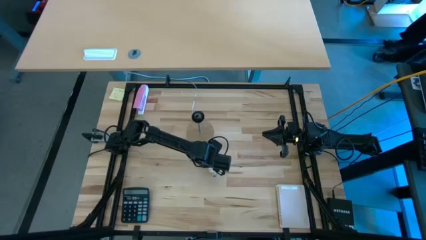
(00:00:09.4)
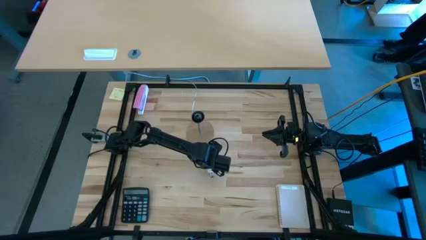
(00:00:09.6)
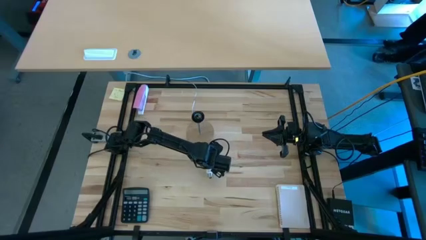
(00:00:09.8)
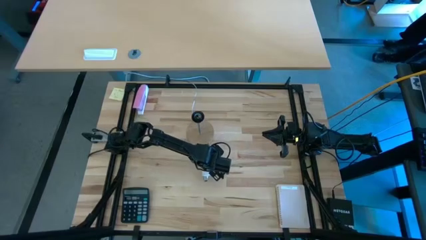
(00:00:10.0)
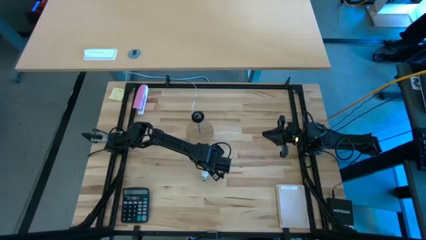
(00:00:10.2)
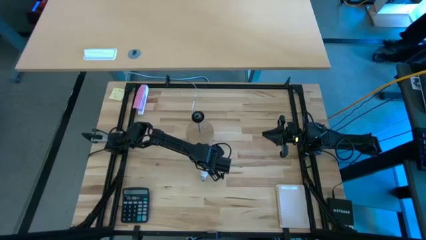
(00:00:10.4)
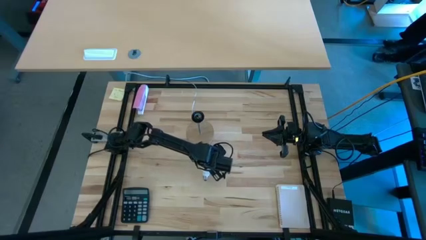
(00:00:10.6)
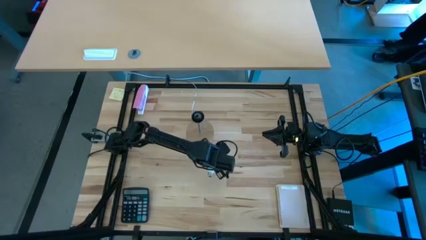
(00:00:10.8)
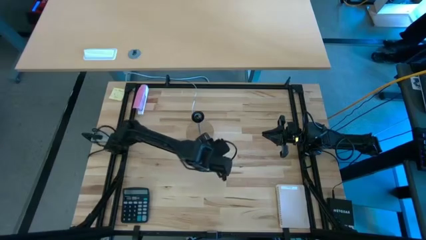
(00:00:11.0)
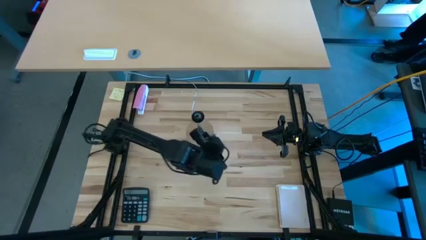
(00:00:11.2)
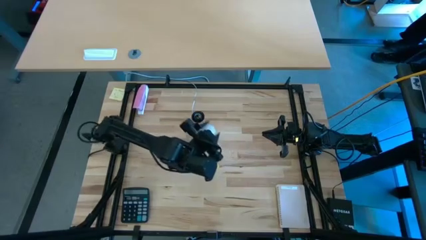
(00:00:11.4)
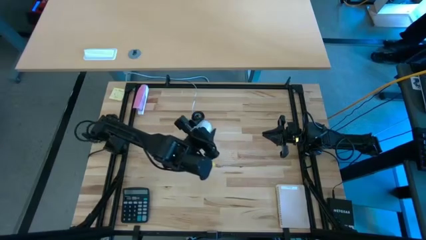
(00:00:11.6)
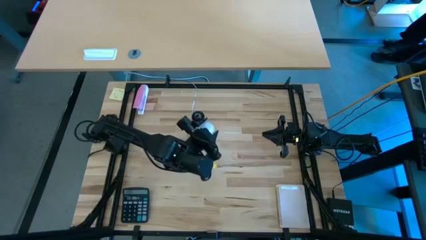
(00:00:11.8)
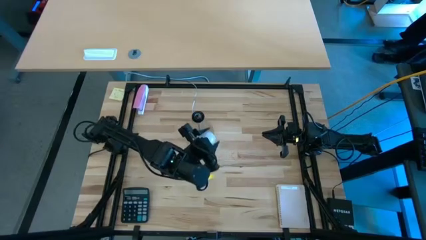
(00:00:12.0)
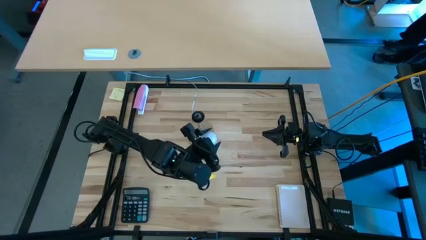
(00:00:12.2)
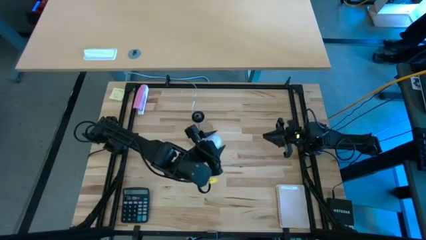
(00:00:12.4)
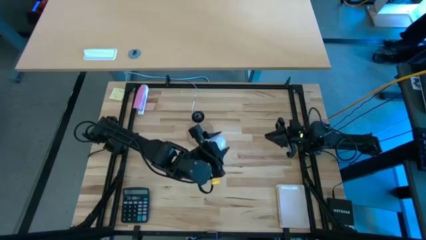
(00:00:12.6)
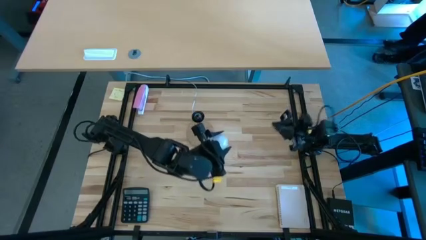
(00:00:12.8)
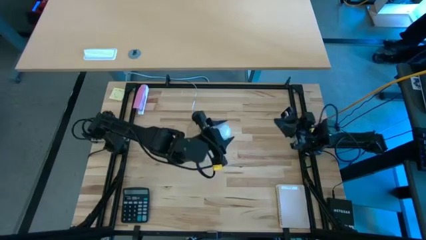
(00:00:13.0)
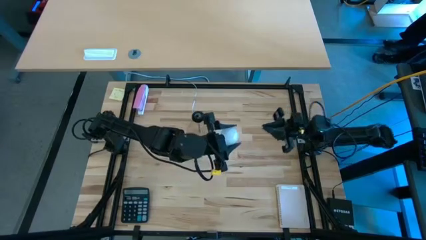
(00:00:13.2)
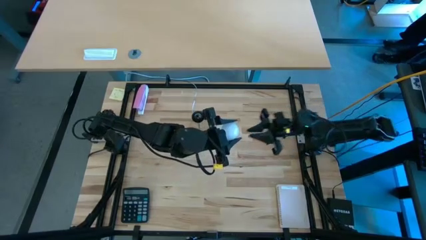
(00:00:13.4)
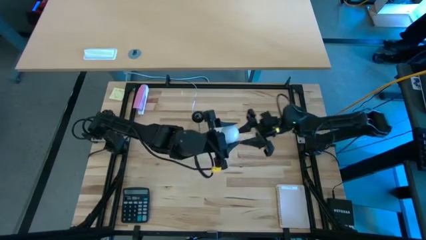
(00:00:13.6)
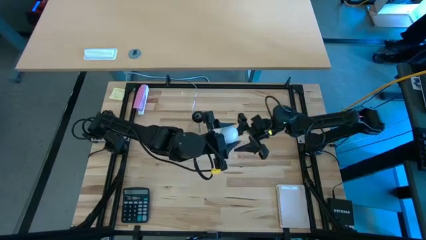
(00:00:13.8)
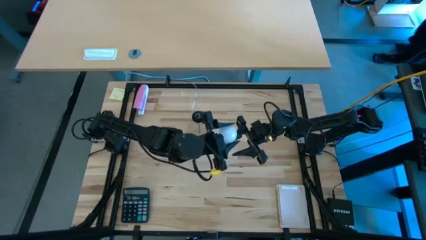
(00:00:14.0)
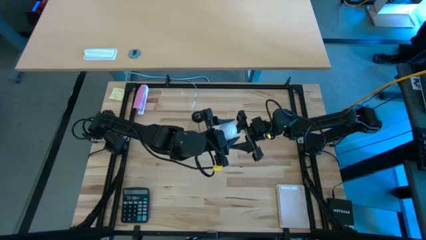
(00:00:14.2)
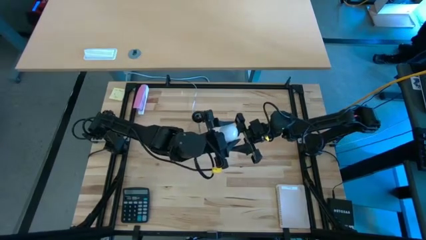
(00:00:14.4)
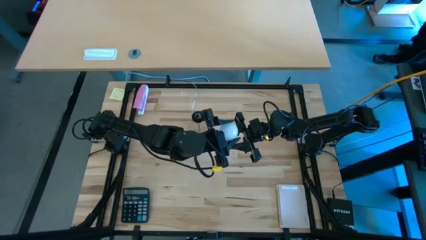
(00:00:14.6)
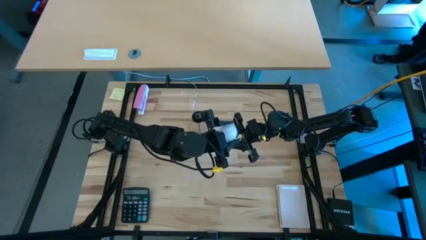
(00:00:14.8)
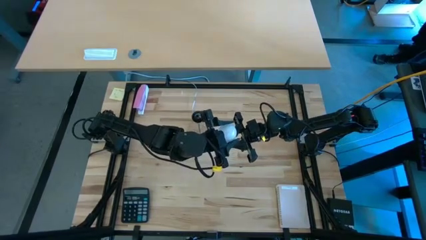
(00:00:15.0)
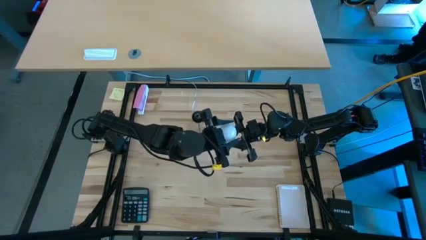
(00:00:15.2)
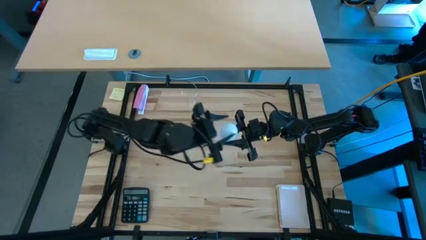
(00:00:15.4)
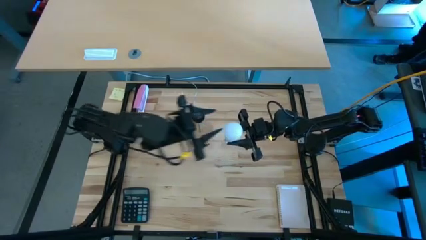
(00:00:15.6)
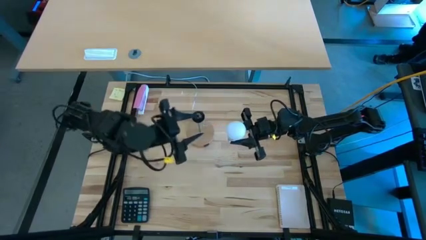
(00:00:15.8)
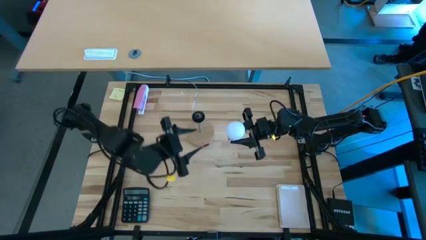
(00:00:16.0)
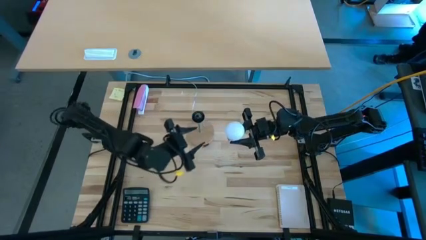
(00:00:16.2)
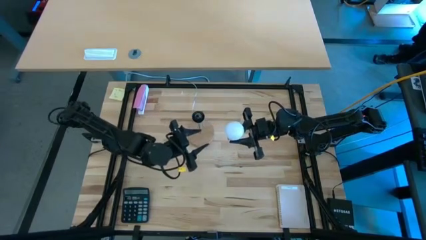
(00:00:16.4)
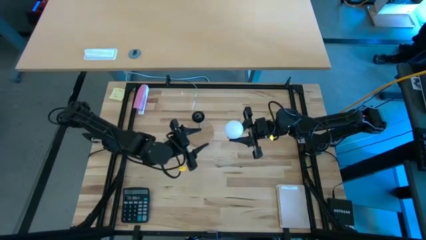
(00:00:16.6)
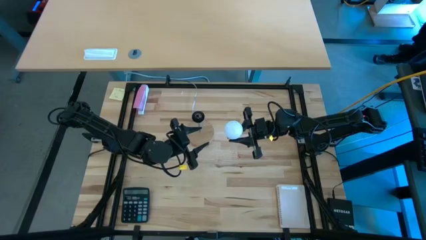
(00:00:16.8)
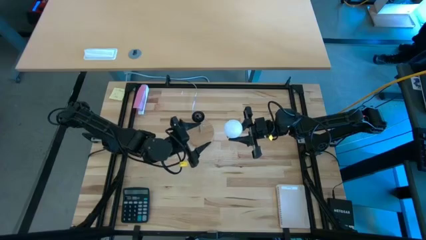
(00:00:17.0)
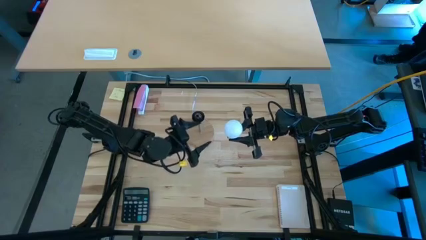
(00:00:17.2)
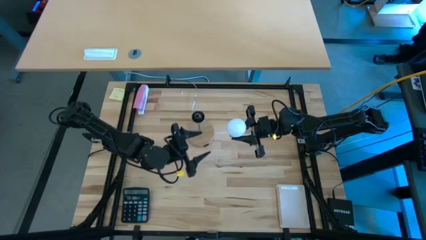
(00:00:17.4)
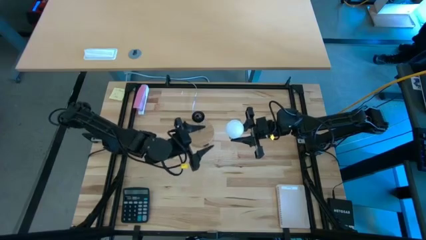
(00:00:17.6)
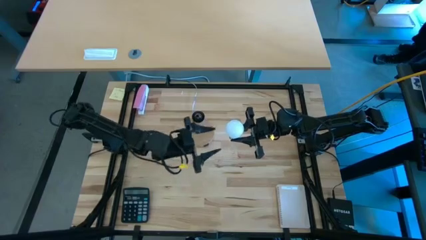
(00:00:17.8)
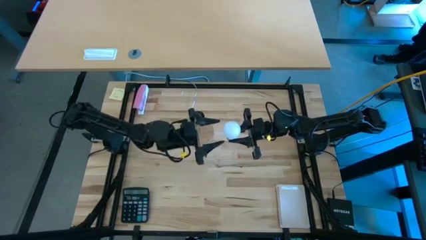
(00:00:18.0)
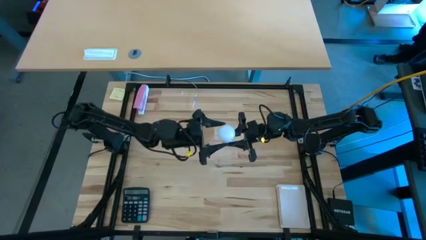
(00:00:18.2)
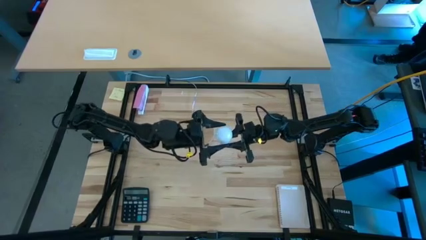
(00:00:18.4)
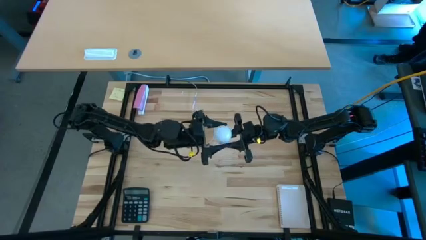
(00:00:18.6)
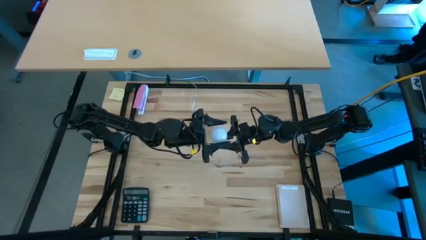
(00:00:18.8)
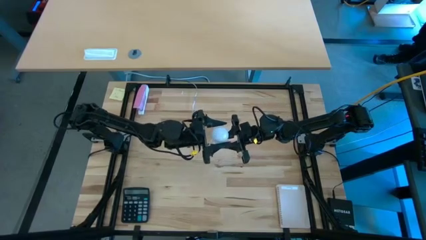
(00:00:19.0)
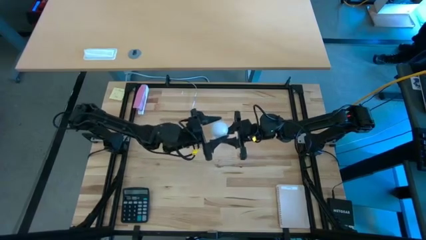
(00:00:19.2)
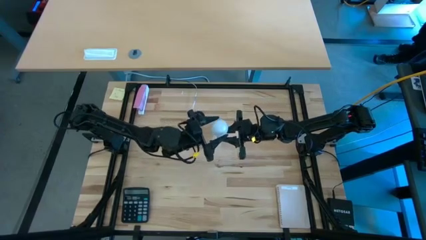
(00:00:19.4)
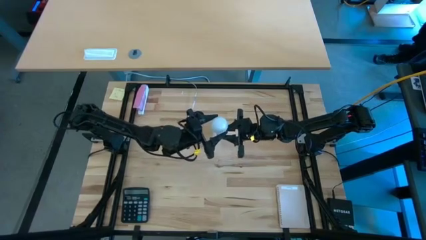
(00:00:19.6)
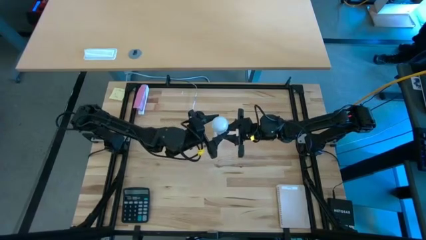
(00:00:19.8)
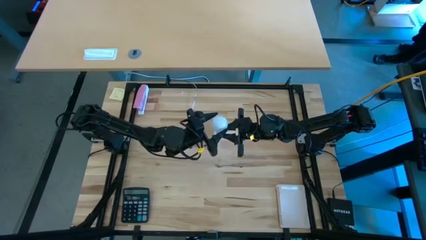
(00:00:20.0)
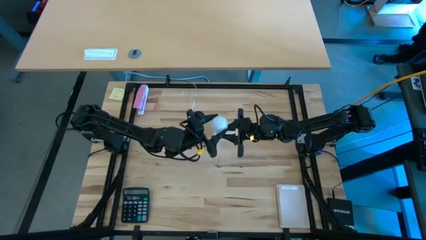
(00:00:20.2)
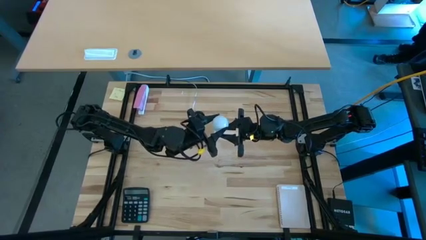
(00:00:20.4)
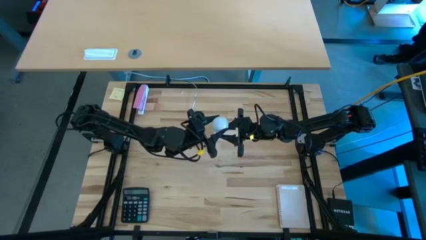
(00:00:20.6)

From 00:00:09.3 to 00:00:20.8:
Task: Screw lightbulb
Insert the white lightbulb into the brown lamp

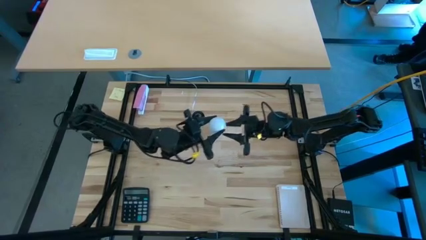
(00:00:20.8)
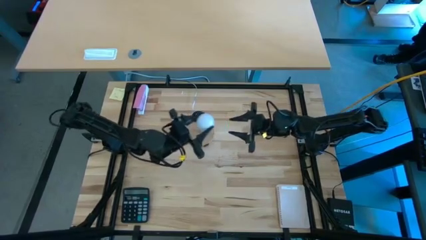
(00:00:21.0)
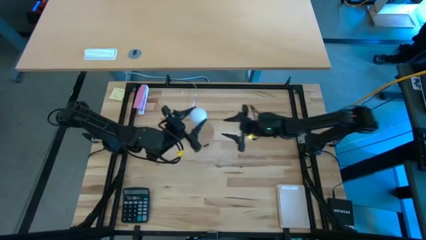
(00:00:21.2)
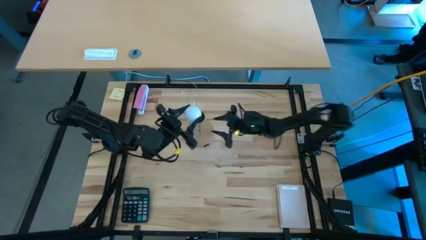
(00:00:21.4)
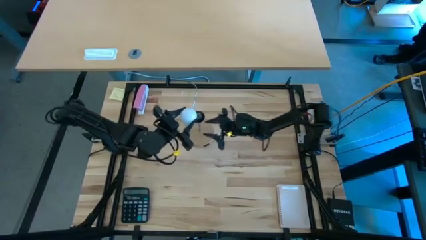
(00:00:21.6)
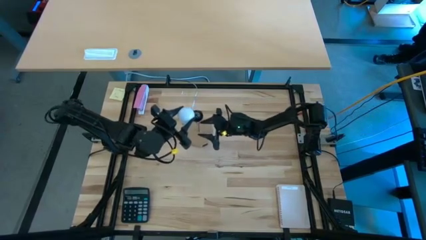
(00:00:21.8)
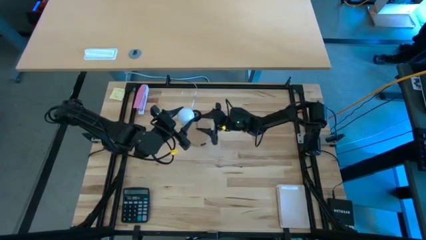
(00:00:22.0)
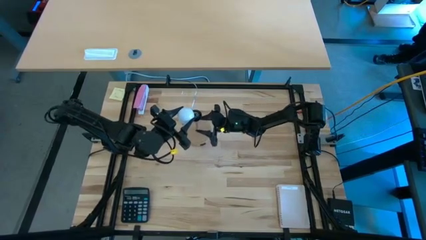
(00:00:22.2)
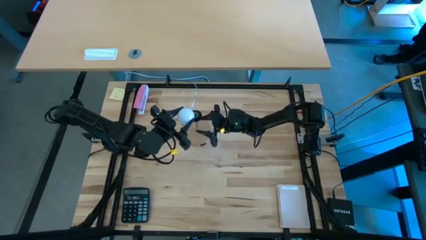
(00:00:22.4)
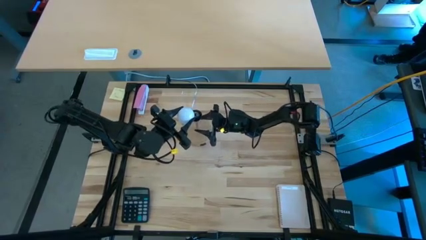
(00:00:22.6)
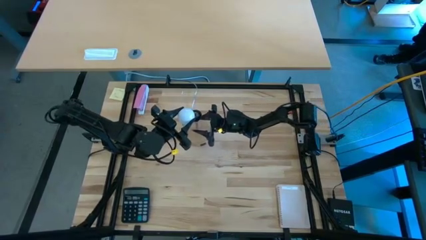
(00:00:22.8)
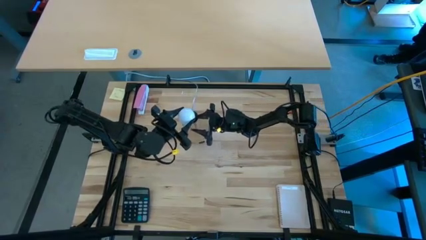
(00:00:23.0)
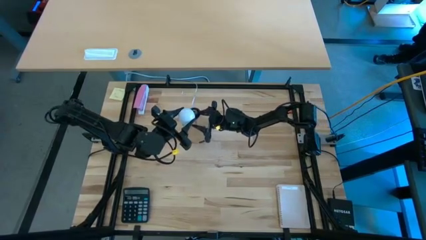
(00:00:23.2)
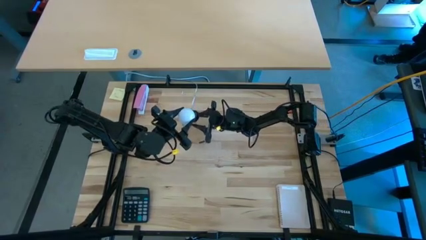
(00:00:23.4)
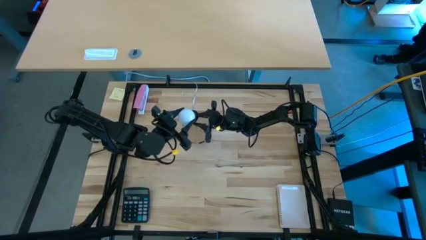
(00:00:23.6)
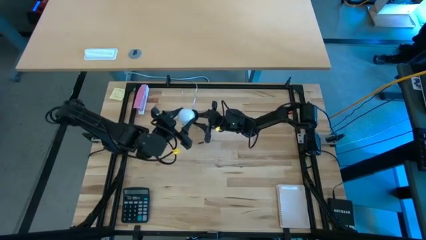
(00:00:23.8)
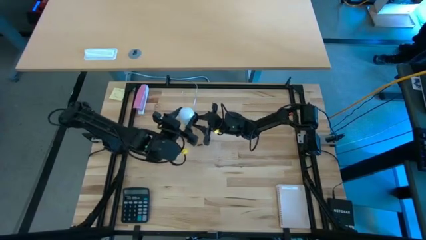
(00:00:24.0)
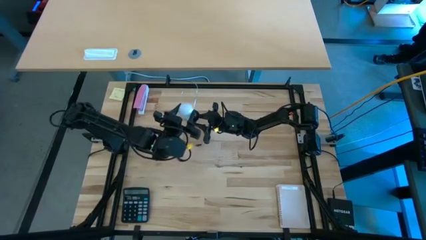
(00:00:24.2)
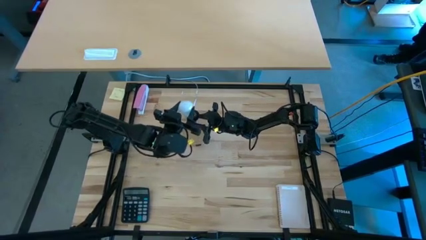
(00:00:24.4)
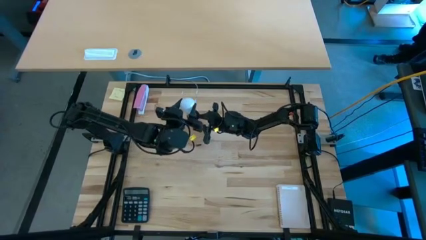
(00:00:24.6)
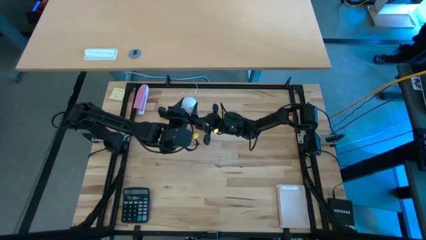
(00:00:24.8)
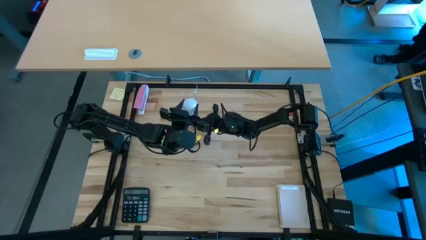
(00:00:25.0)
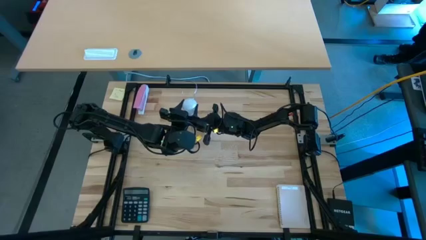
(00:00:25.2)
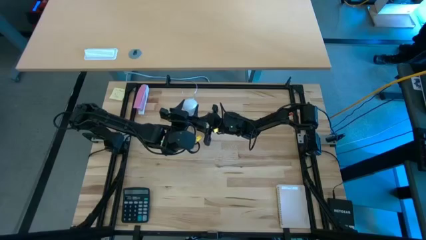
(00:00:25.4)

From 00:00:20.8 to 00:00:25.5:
Insert the white lightbulb into the brown lamp
